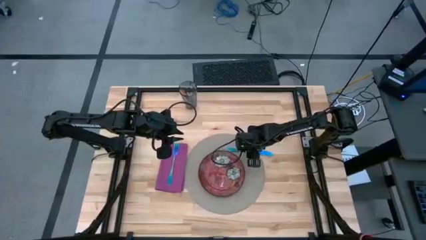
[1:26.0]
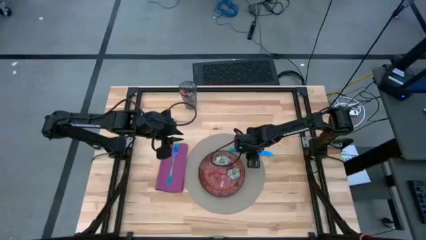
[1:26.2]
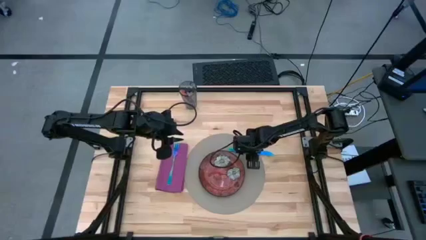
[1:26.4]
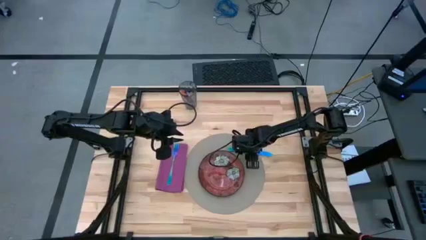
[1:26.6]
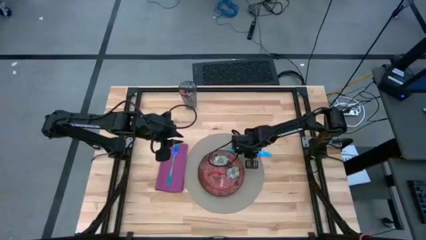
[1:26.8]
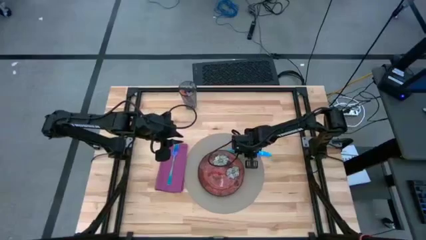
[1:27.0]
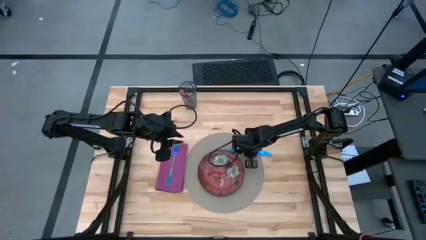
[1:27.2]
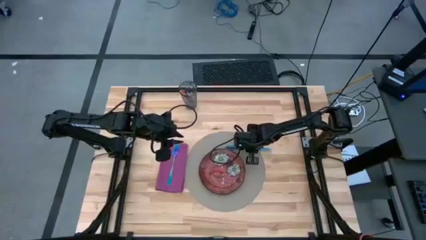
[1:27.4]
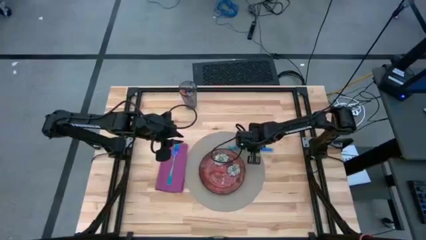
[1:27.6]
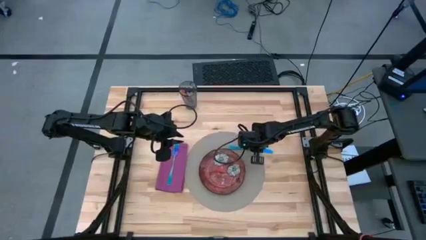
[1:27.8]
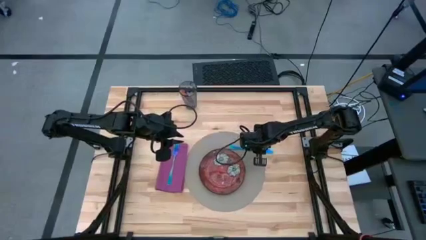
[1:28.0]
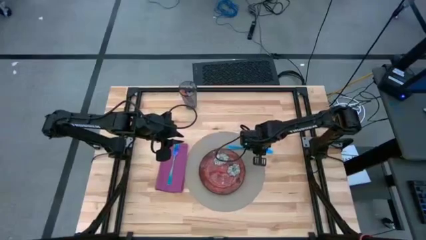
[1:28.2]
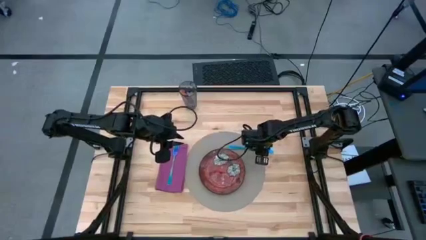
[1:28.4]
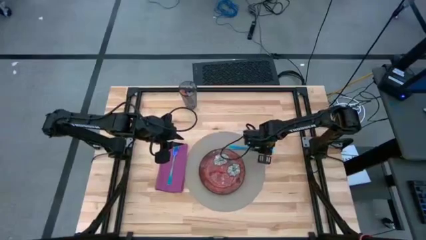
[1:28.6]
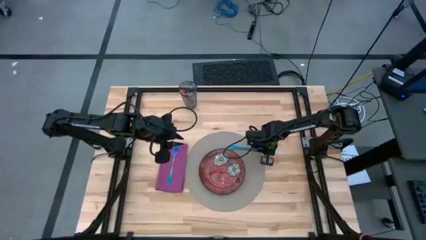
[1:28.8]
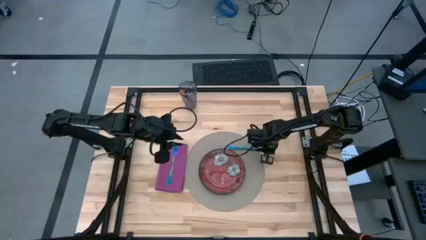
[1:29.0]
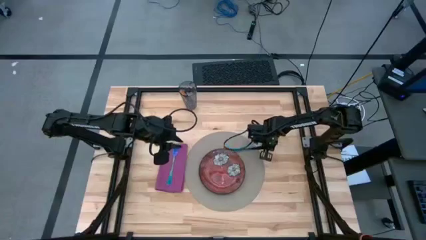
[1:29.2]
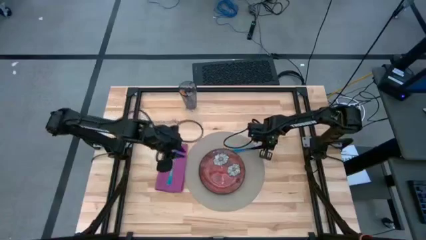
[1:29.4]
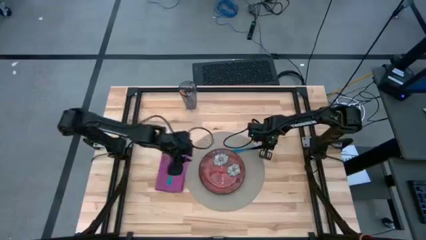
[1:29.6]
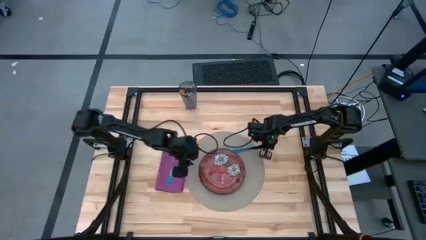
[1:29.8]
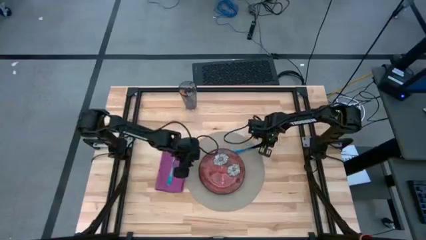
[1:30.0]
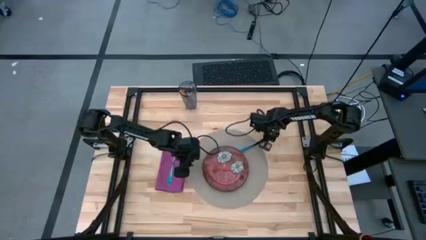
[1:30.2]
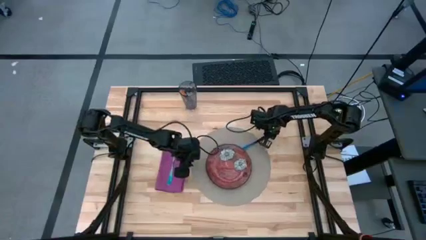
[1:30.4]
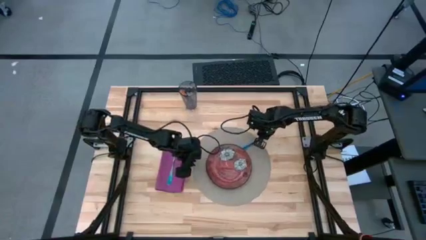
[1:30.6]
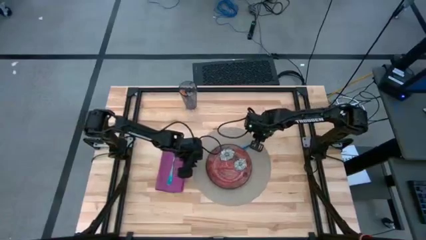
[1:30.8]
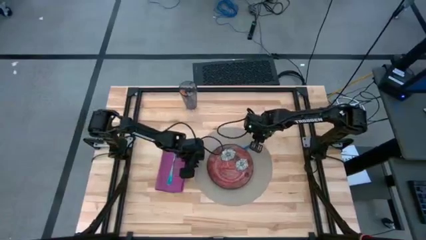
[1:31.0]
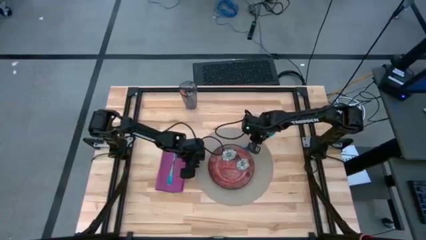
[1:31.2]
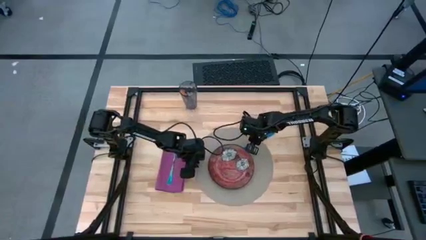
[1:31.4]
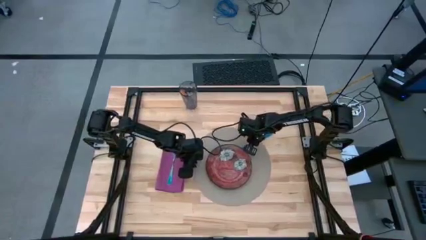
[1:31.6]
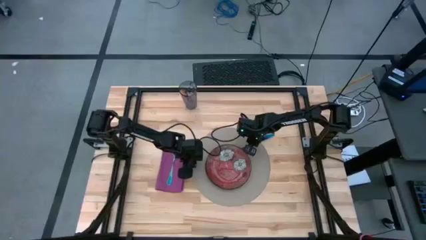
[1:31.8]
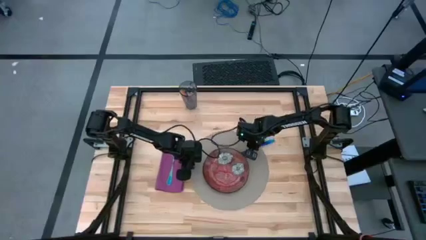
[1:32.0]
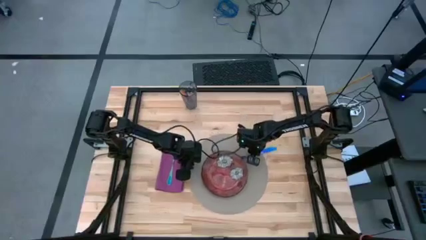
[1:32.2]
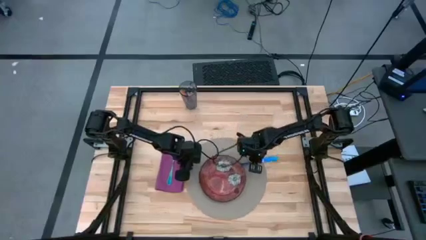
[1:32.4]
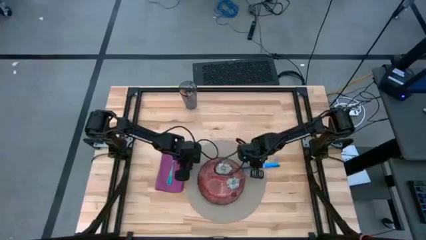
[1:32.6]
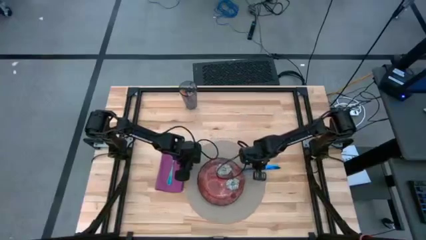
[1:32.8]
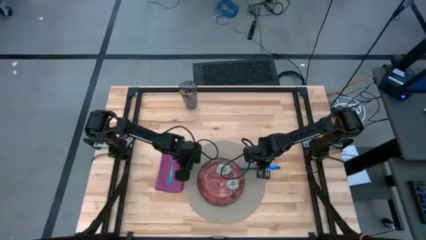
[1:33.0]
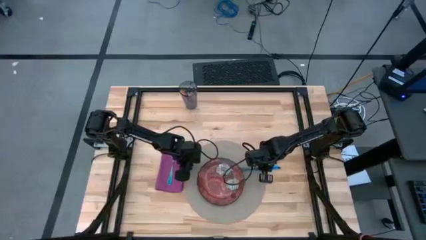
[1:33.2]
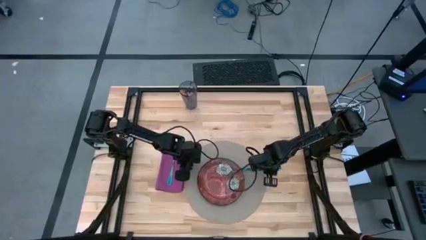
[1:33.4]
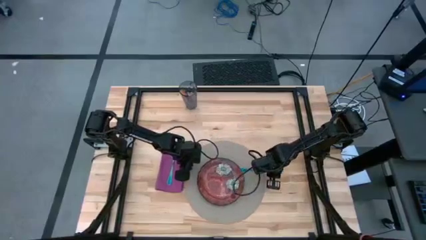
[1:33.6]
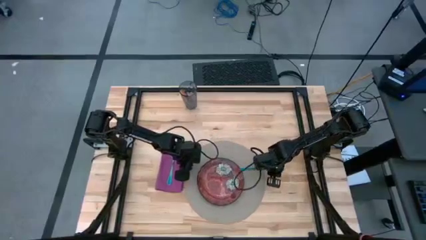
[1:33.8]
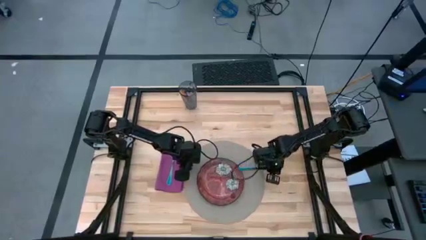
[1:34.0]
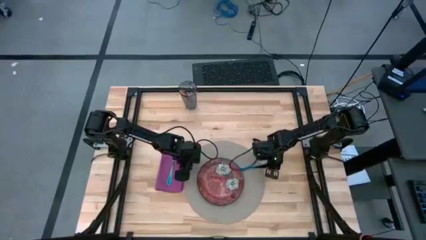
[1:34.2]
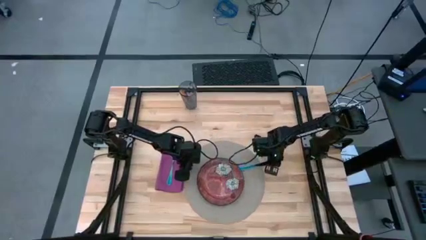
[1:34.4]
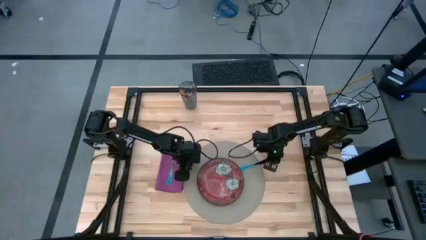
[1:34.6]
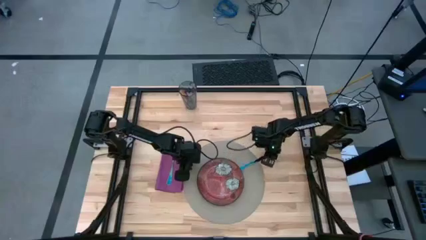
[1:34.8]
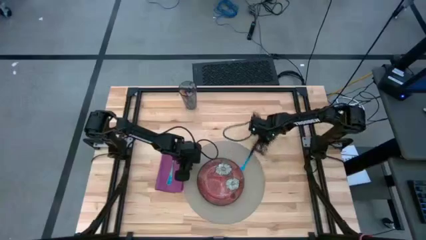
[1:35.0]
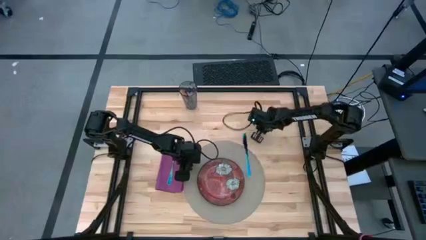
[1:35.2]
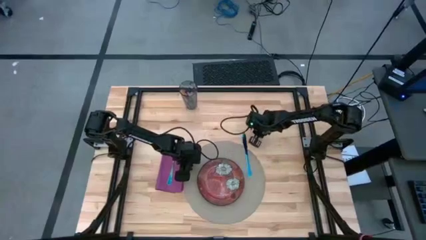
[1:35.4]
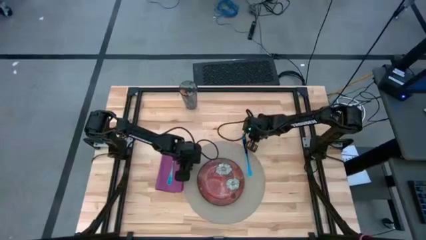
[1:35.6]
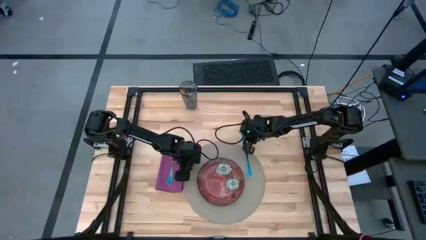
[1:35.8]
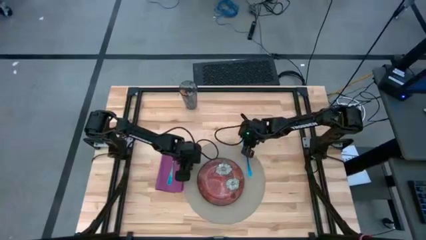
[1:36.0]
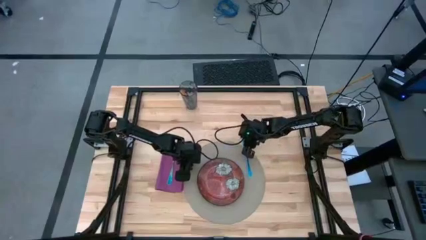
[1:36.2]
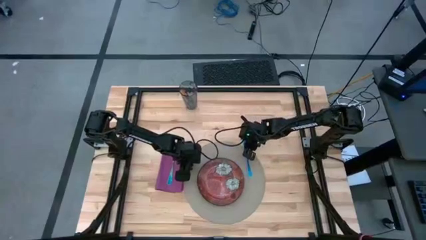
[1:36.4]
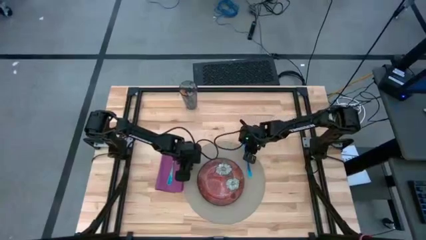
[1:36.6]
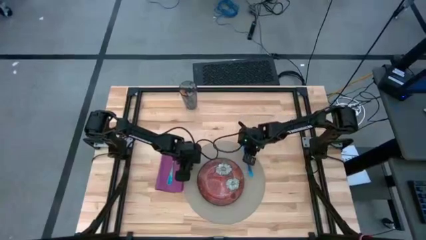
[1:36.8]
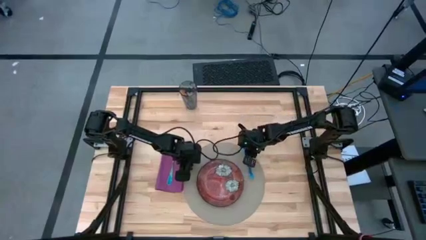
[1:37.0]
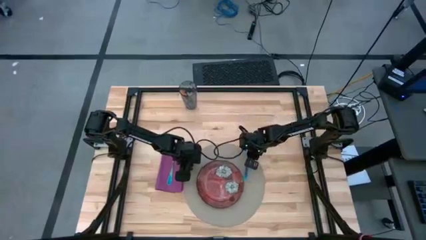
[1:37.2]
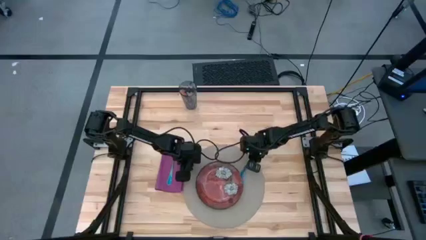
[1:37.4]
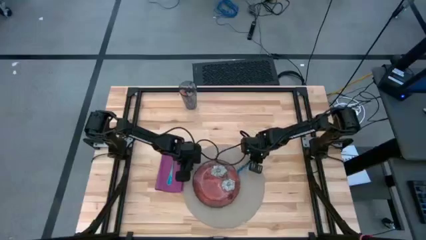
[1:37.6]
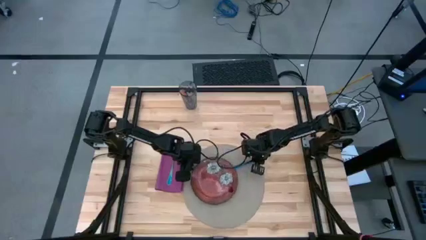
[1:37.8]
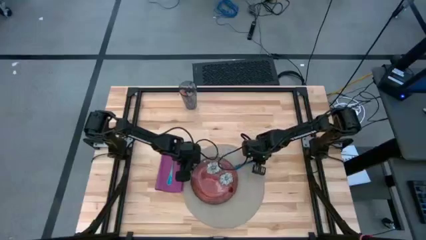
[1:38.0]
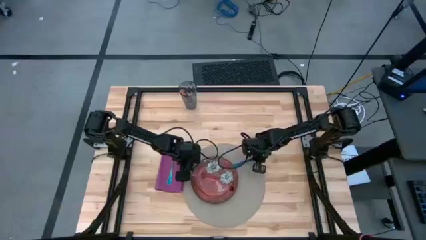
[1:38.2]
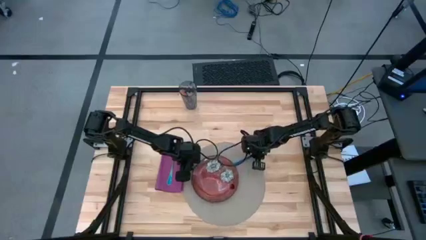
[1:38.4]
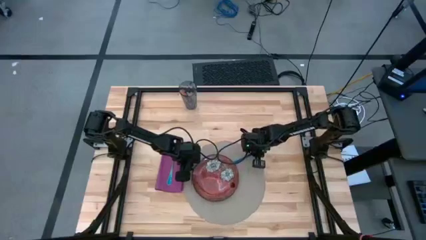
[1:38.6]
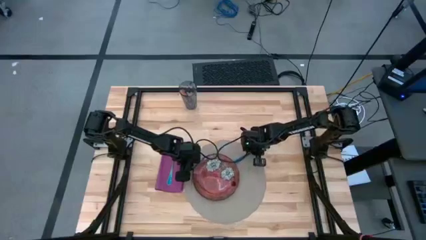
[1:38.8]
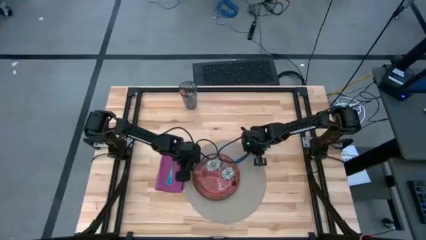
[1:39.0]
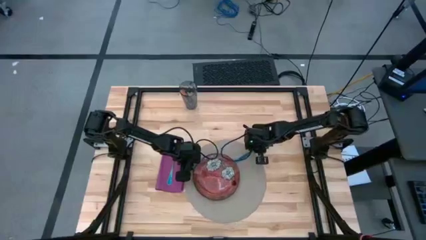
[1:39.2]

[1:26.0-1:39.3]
Task: Set table place
Put the blue knife on the middle right of the table

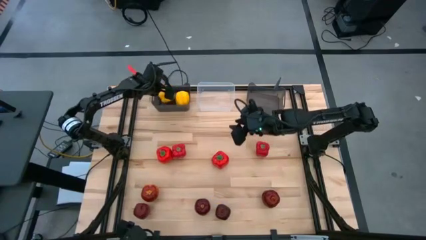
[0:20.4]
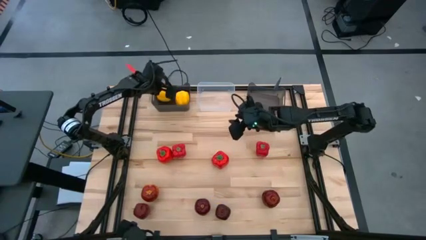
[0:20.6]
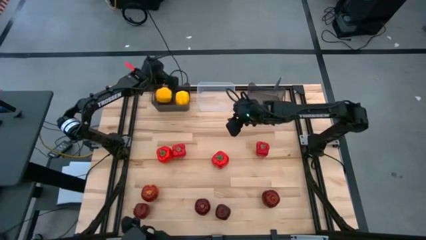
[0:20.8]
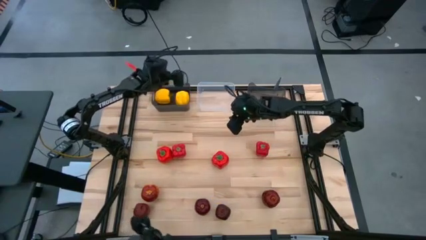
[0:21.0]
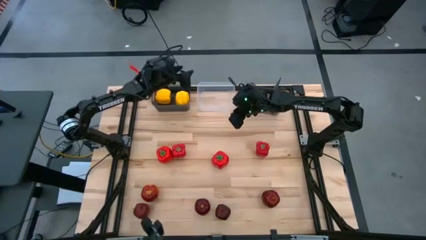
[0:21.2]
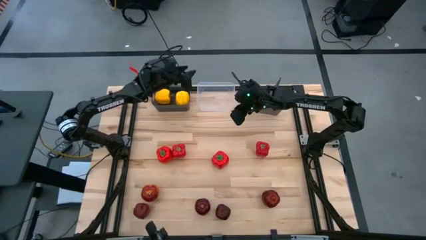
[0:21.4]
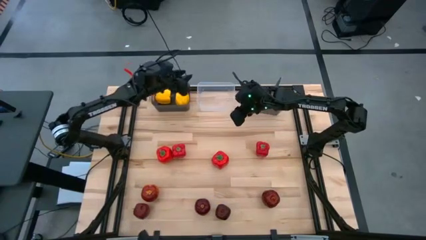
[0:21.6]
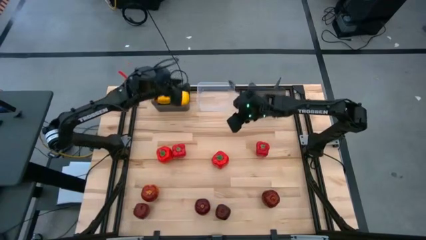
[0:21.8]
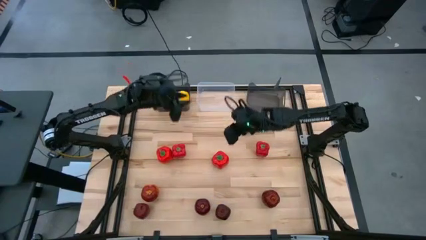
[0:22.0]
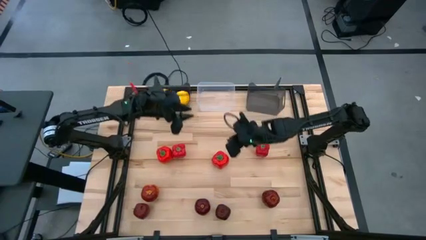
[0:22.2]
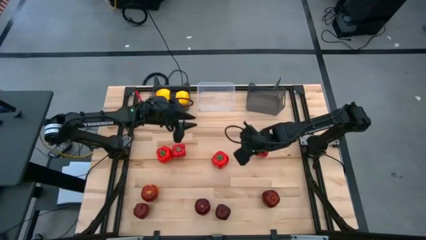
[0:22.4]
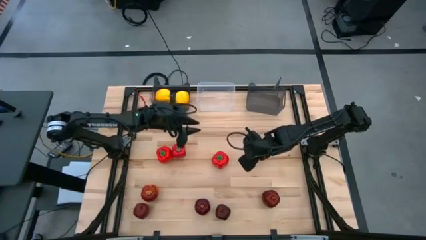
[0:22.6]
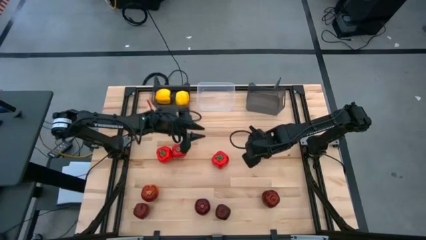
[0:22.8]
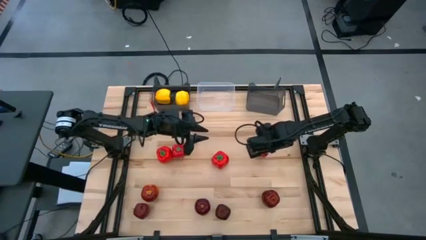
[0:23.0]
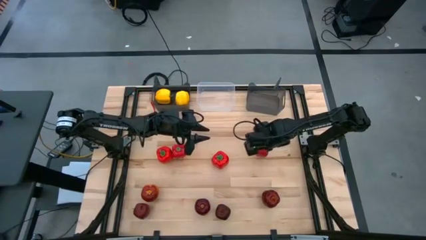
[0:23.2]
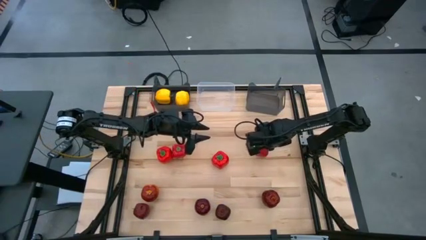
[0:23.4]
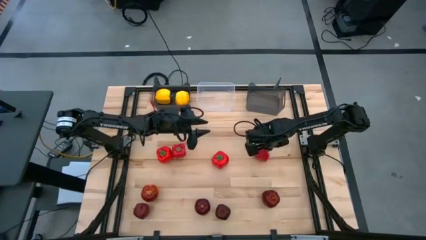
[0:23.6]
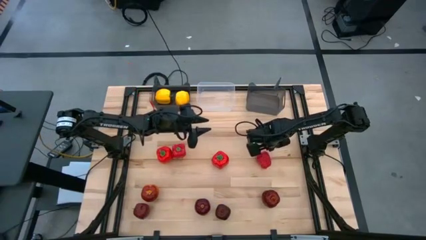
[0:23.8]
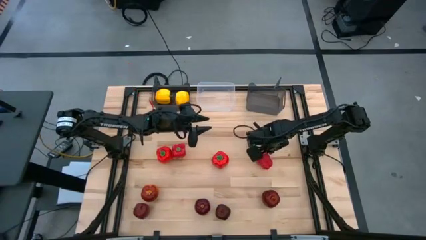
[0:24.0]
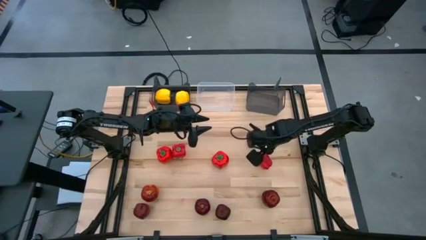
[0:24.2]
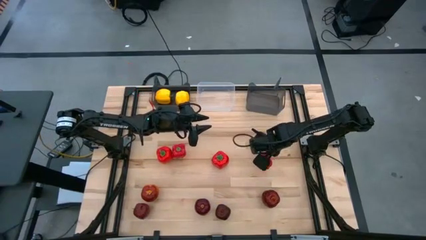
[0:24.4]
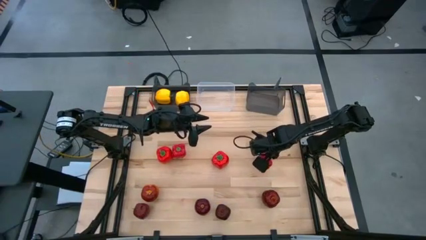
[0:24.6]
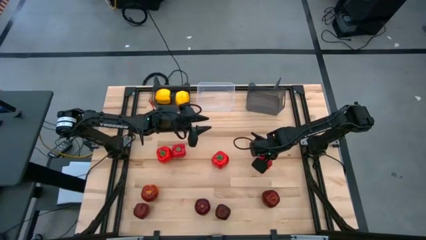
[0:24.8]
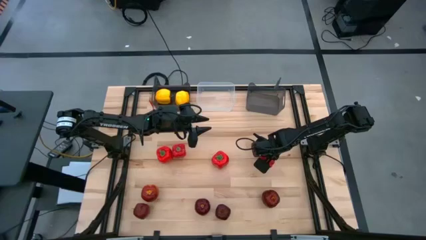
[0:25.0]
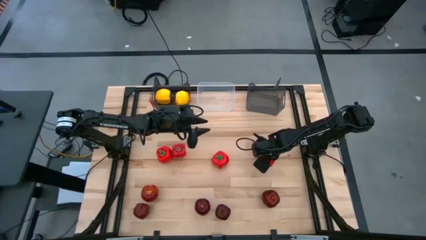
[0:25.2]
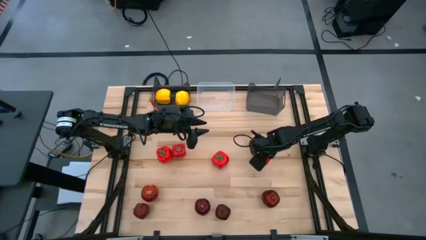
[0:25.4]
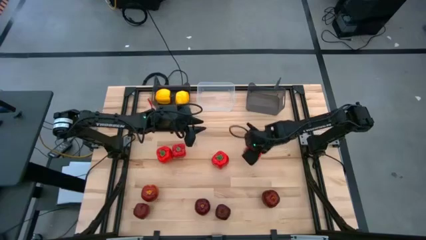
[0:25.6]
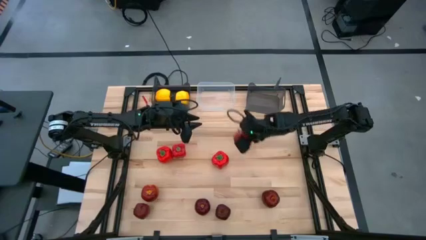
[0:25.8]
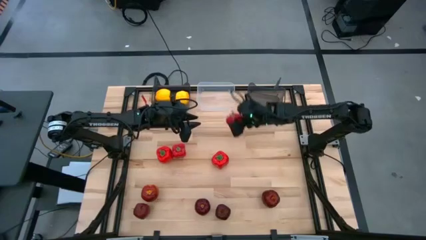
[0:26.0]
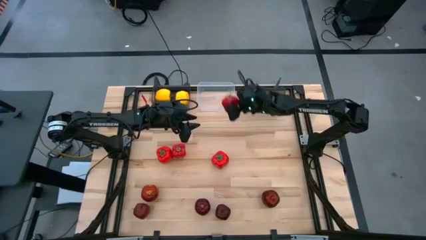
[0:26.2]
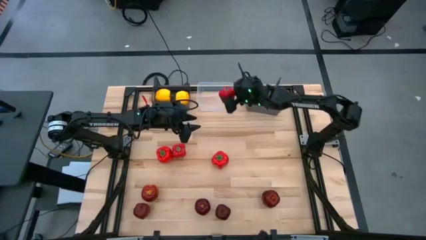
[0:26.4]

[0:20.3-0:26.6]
Task: Sort produce into baskets
Put the right red bell pepper into the transparent bin
